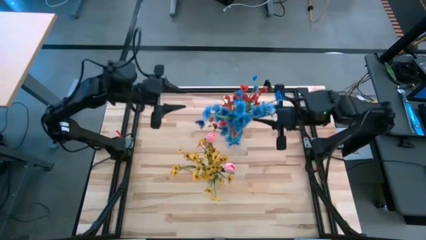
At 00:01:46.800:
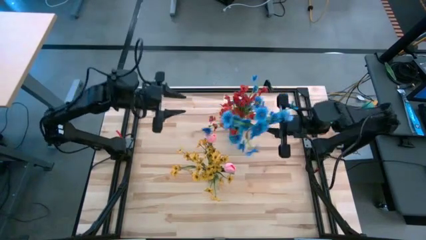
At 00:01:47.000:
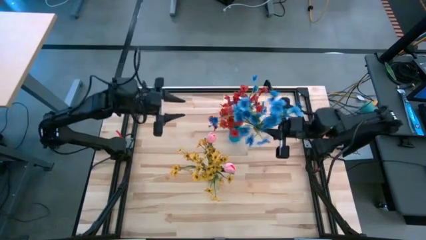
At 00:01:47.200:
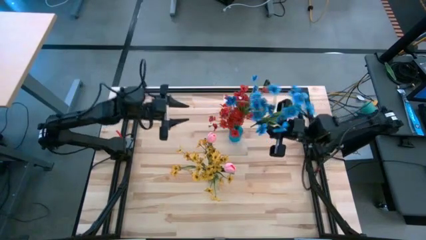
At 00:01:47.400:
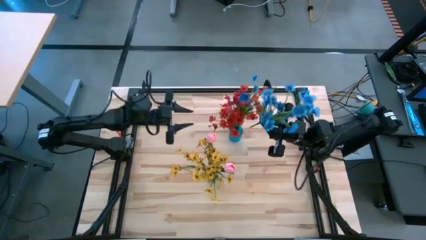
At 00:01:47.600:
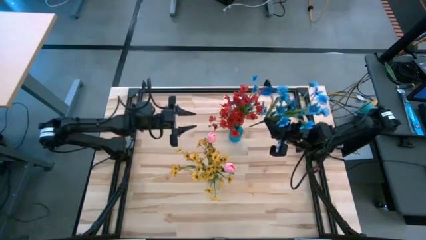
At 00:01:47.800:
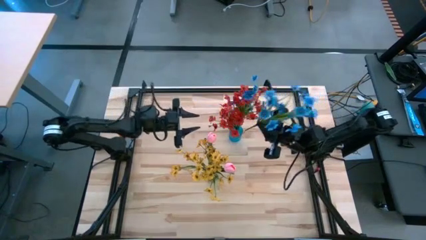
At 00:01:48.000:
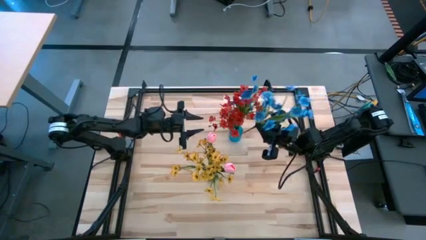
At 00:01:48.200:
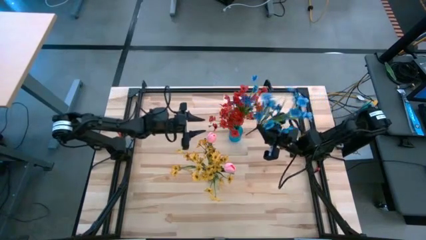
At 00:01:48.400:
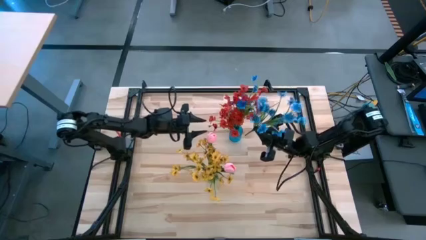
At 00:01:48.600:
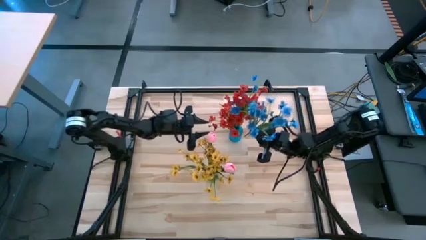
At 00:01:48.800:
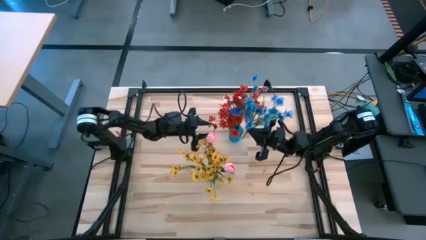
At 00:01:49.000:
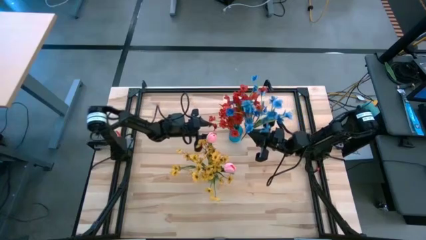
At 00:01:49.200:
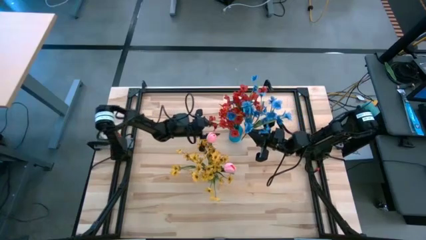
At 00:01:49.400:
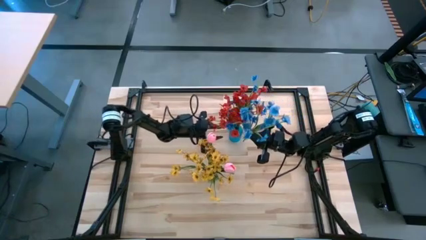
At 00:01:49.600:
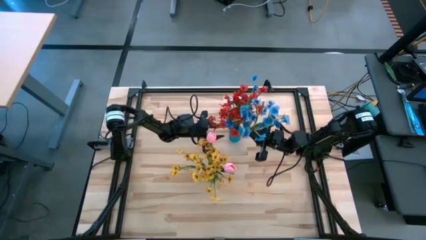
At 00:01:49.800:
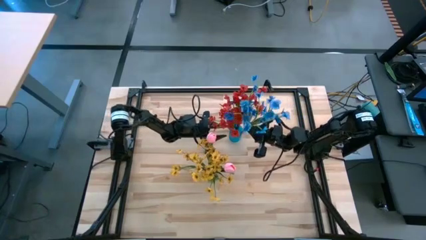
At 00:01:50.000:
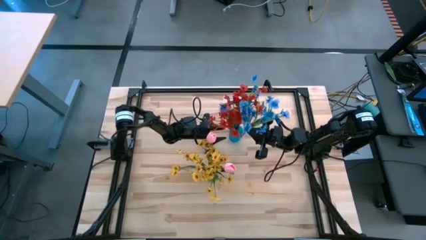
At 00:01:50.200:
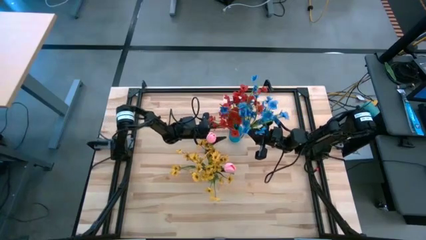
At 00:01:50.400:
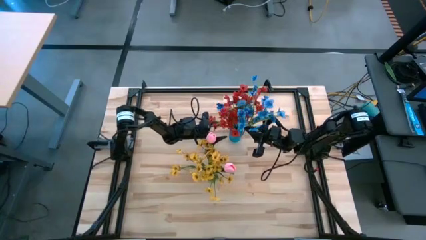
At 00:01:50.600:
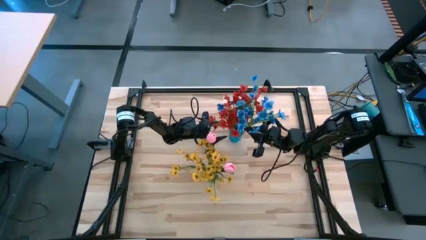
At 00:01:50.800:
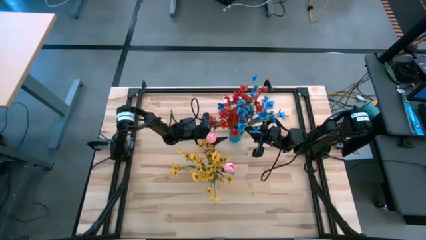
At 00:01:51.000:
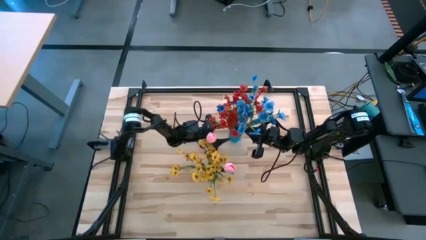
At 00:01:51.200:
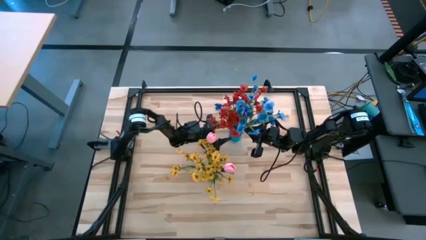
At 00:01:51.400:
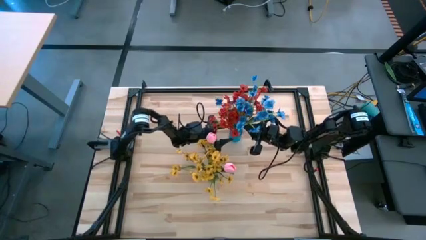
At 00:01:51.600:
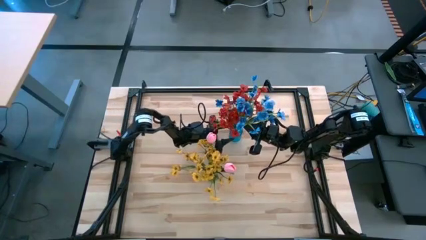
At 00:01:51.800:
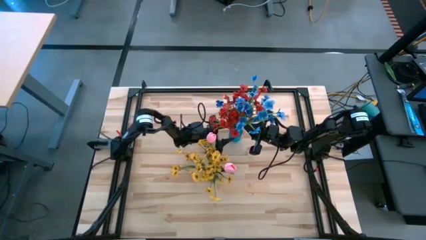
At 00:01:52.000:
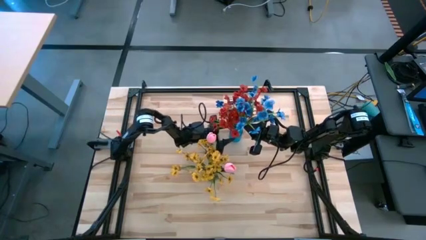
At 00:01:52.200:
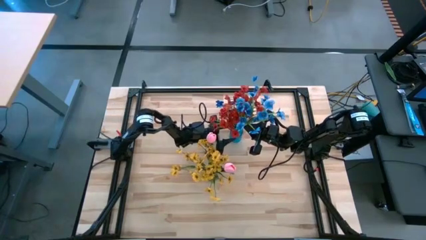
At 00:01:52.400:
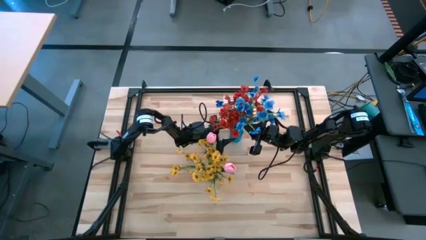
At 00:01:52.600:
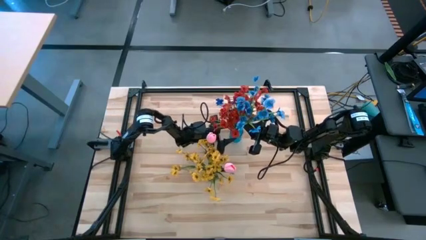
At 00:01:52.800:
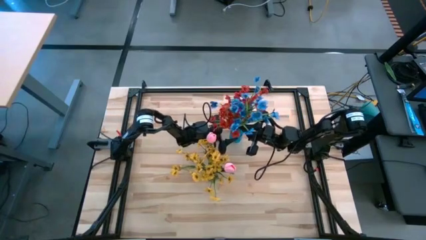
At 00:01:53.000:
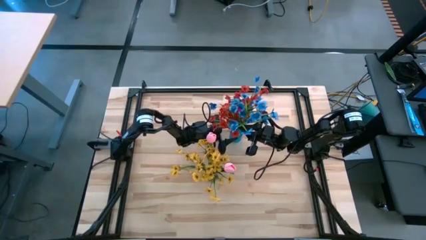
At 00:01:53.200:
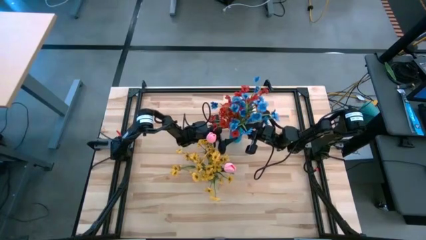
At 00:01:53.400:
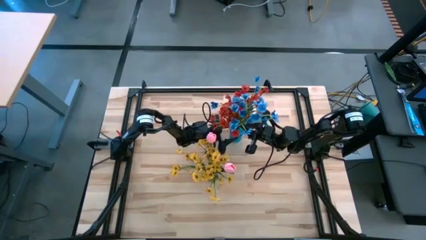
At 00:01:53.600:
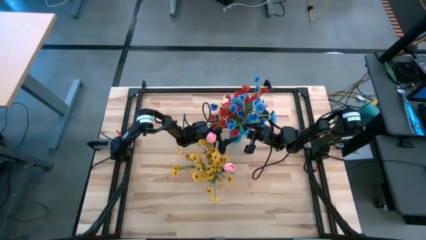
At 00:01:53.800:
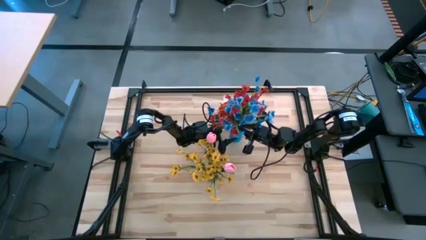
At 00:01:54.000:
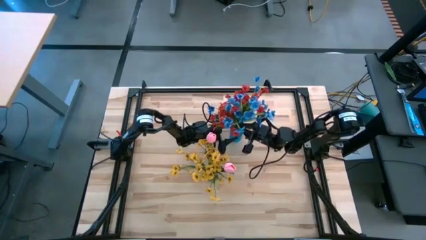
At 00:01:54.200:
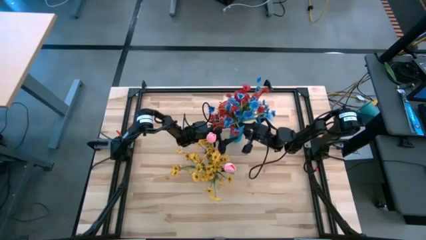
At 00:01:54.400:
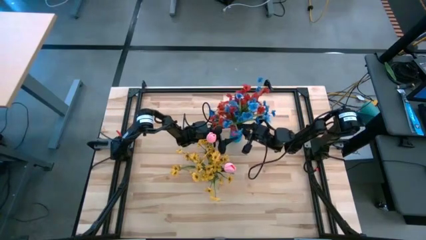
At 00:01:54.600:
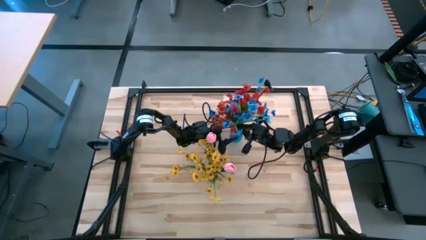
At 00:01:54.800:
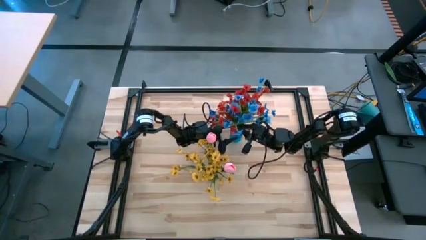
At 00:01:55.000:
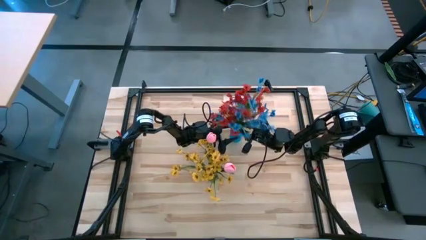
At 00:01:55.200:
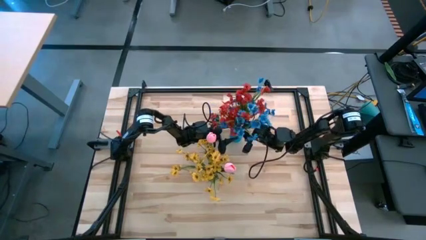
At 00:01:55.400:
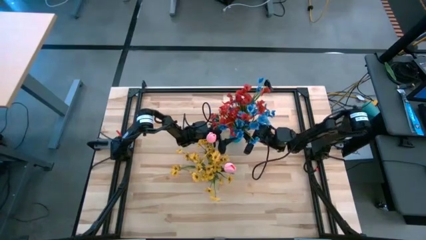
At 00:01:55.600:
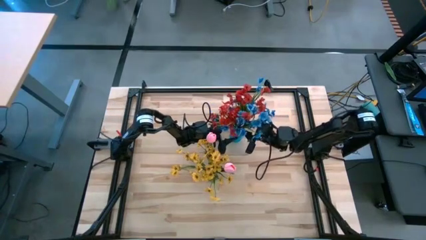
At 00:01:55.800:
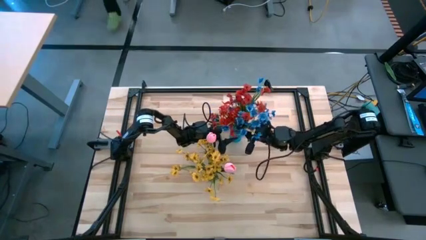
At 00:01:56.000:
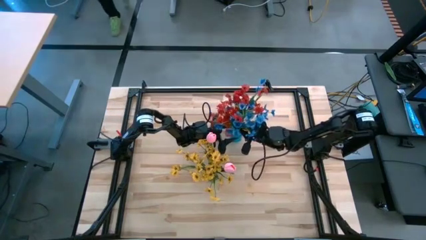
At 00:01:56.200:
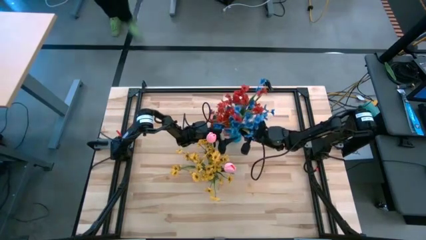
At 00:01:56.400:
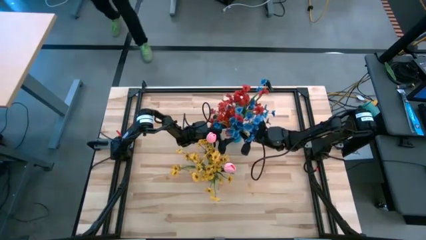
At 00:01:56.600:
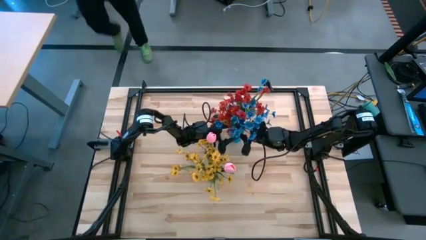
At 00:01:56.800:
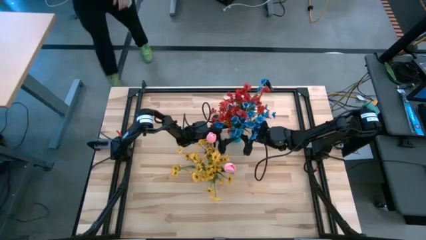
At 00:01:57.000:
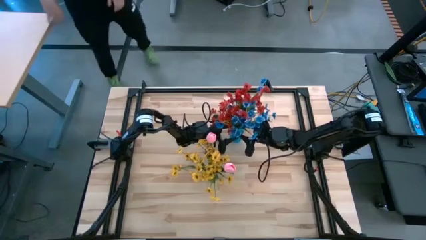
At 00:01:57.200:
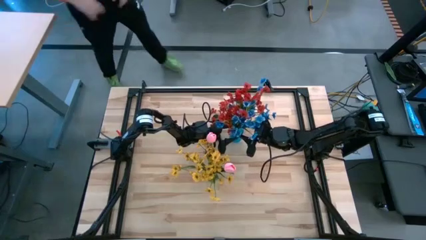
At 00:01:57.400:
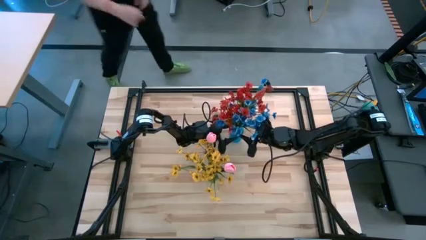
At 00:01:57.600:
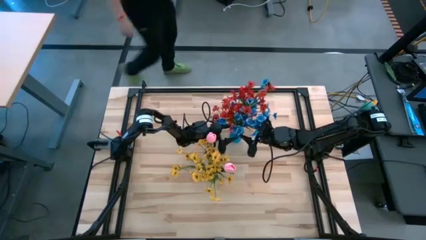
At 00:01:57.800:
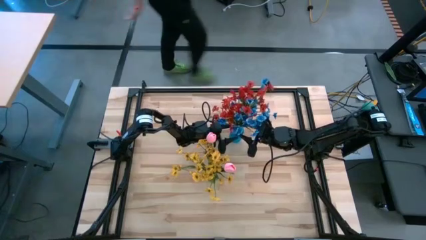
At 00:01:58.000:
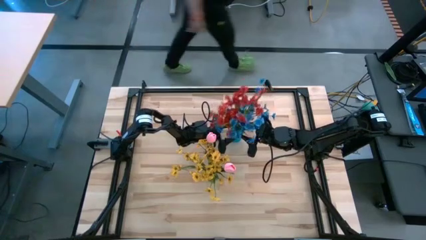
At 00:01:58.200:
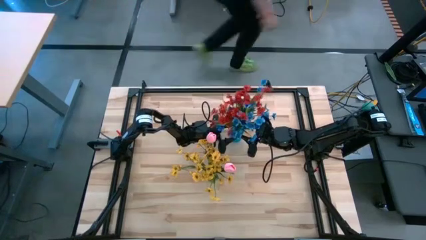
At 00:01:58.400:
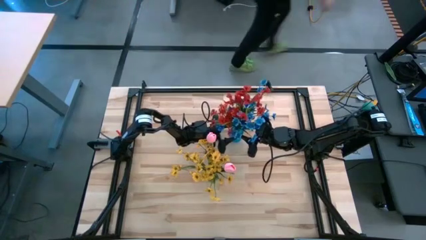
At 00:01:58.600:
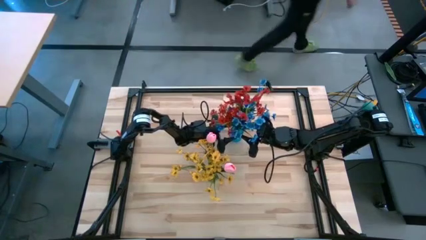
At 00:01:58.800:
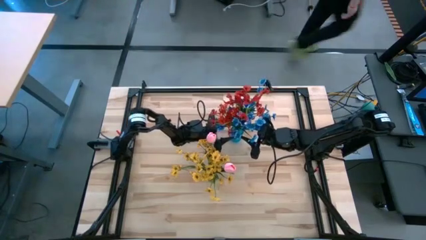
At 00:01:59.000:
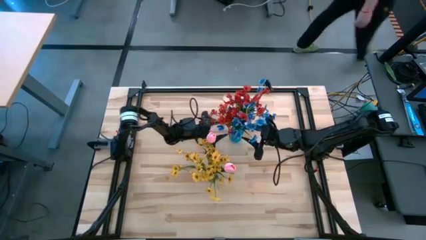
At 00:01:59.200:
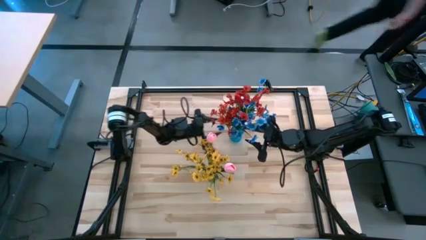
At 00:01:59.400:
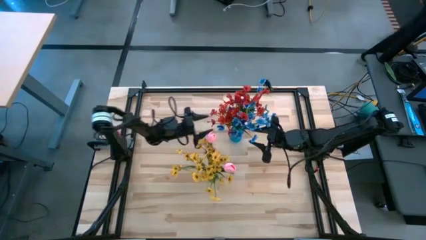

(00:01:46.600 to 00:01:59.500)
Task: Sort flowers into vase by color
Put the blue flowers into the blue flower vase

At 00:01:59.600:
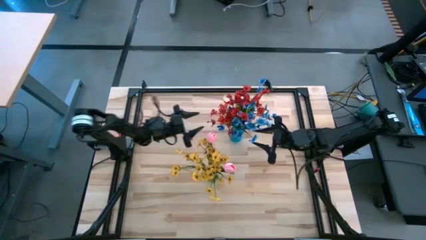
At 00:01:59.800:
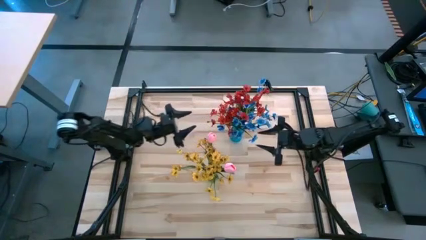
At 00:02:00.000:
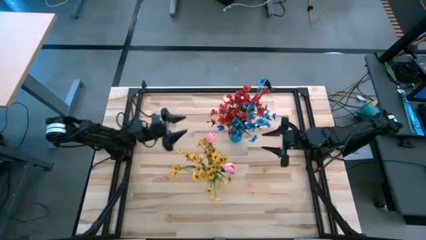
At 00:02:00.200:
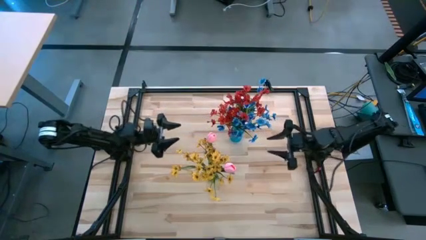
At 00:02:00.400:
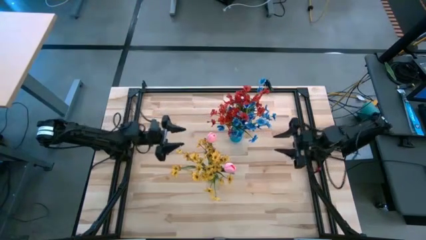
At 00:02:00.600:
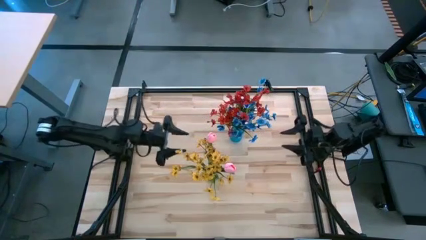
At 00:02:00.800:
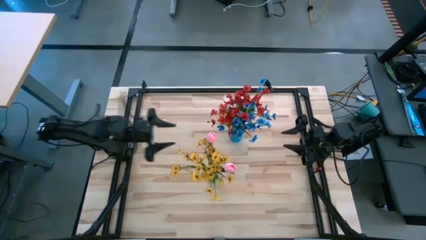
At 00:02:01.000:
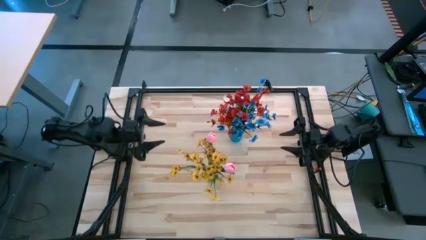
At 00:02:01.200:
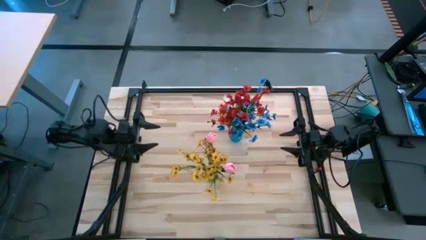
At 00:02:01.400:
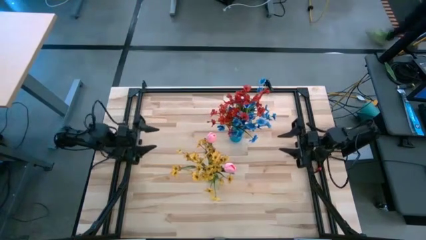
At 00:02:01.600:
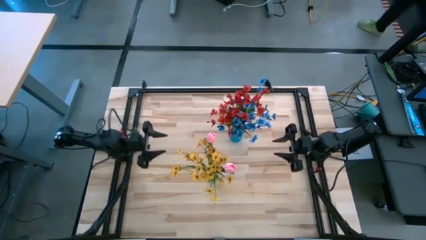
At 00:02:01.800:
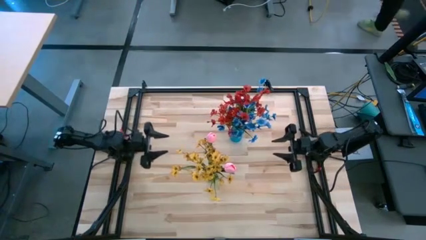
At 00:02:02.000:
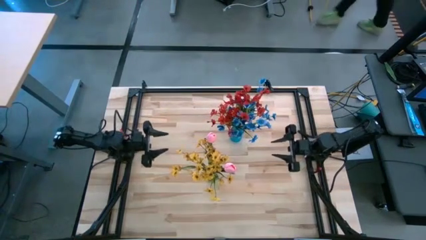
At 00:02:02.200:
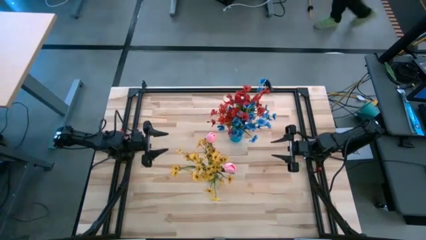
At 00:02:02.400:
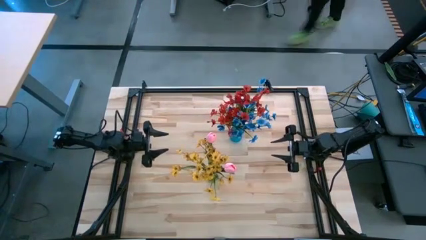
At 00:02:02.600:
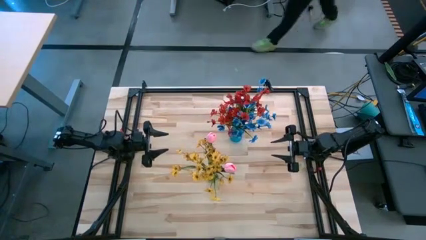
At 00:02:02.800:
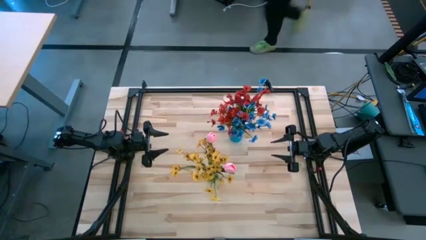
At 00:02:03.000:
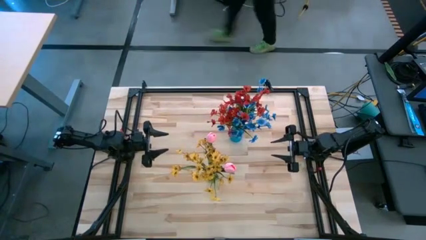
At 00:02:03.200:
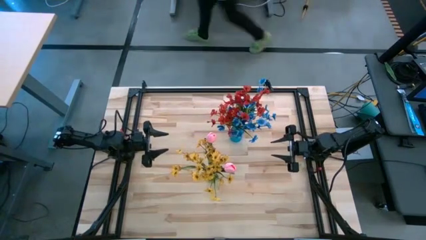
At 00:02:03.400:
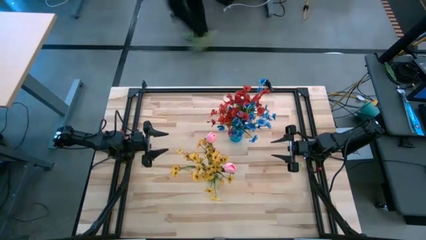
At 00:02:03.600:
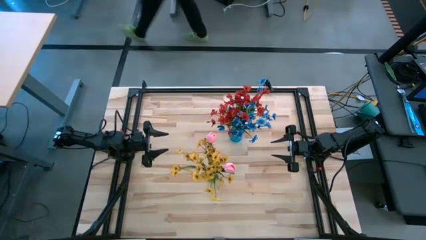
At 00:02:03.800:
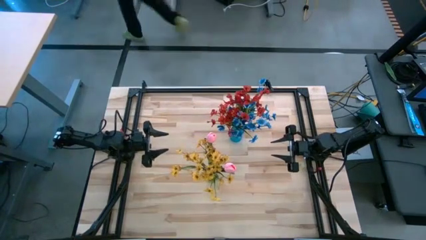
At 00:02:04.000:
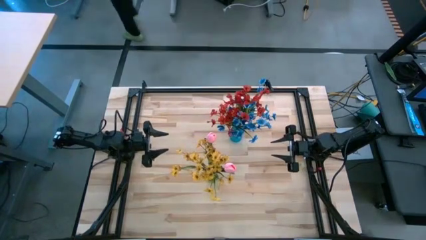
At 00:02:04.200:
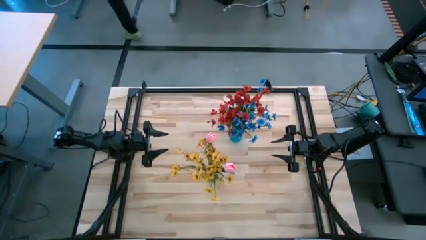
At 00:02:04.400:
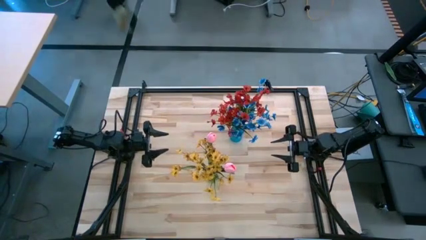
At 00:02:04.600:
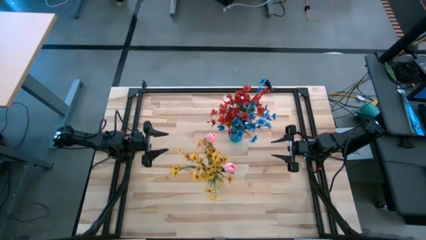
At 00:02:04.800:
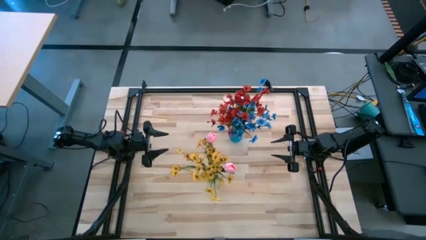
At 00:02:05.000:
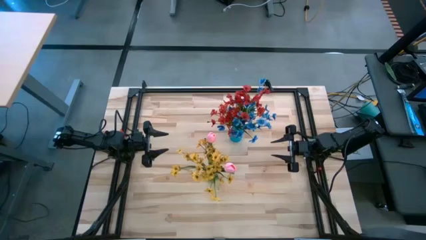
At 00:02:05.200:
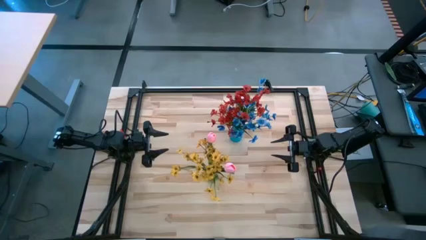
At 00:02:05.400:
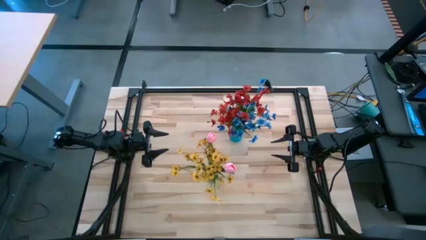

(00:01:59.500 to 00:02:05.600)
Return to Home Position
